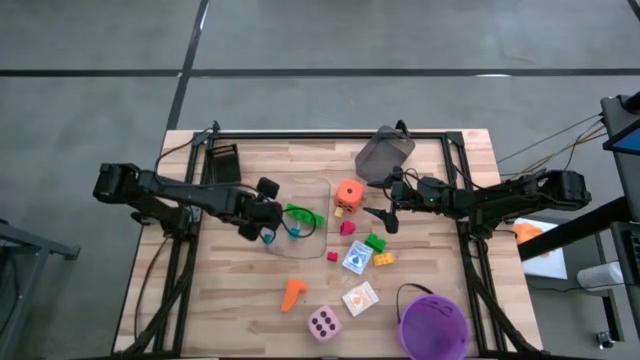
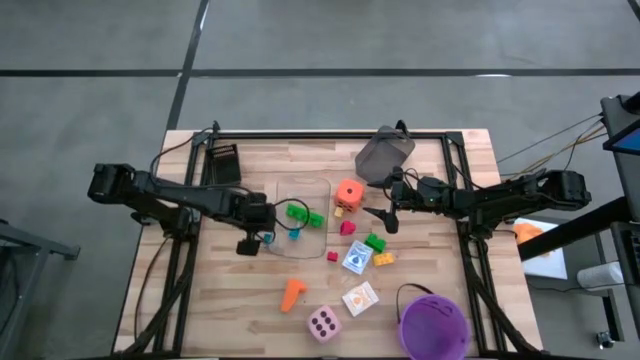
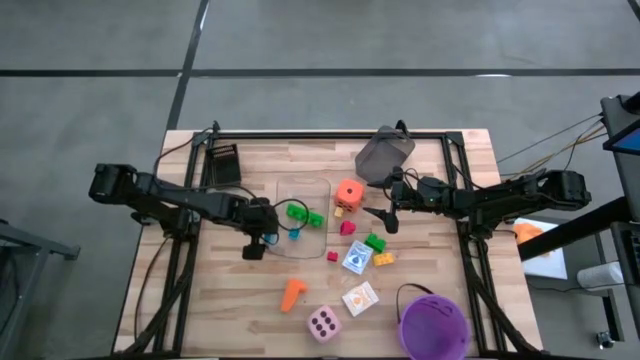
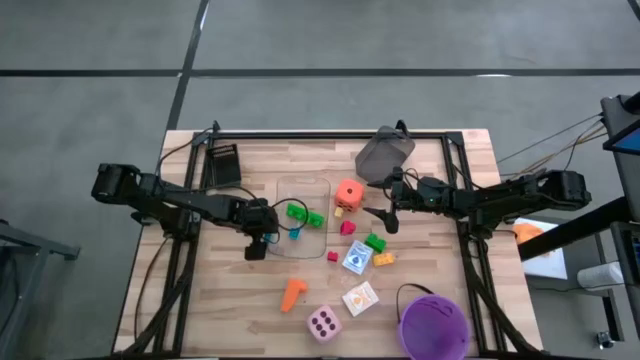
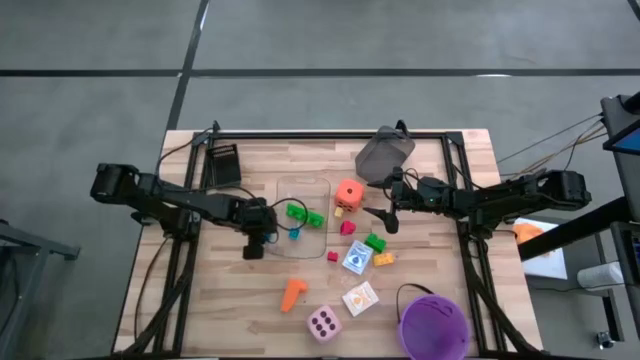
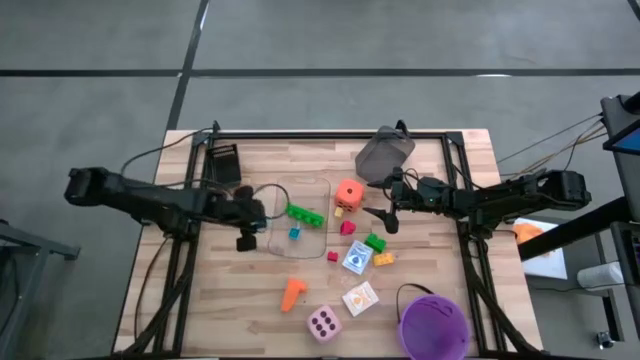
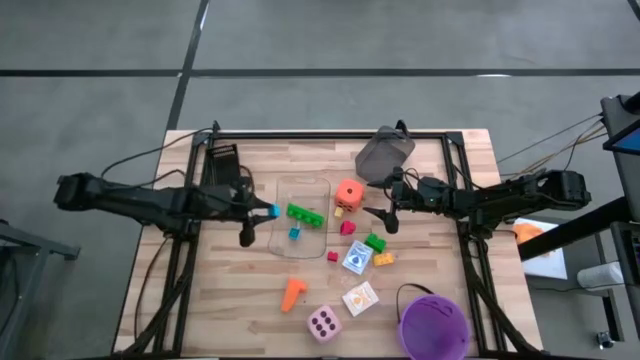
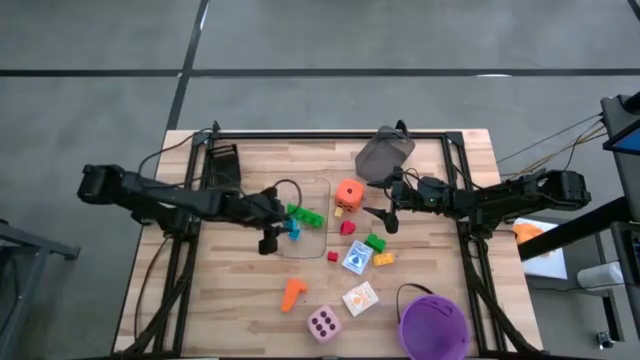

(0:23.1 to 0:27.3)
Task: Pick & Place Toys
Put the blue game piece into the transparent bin

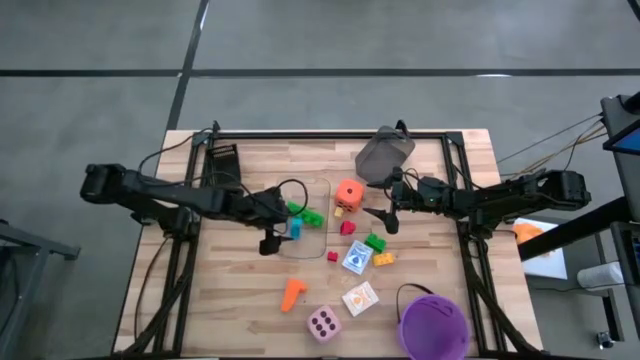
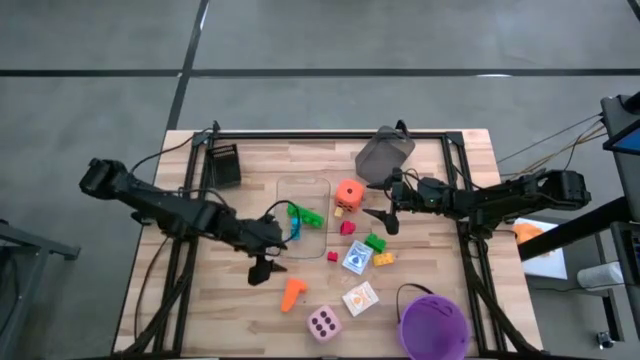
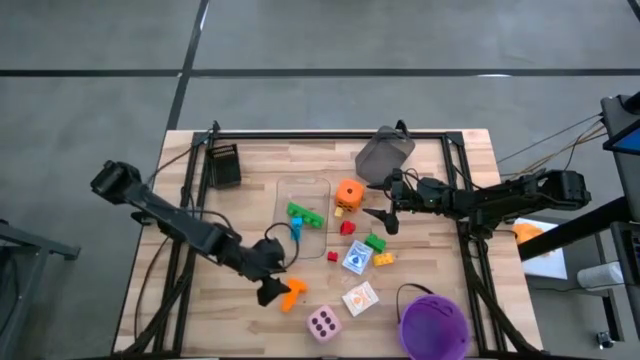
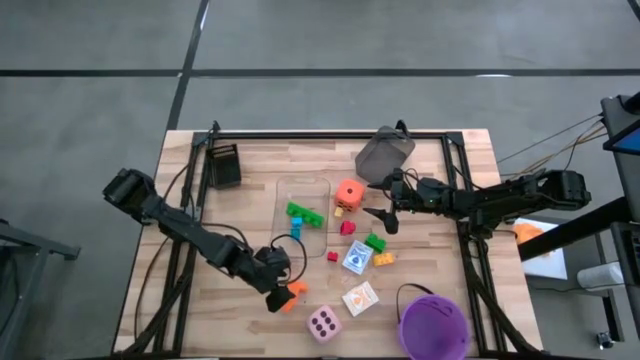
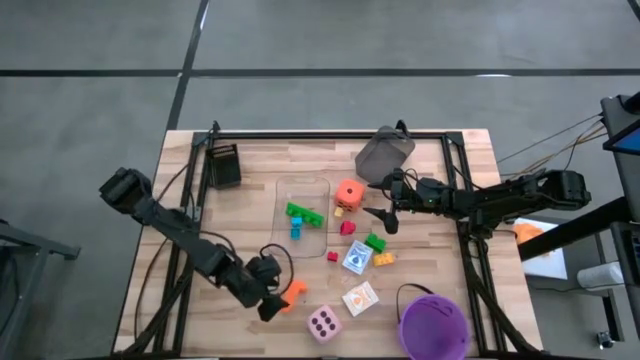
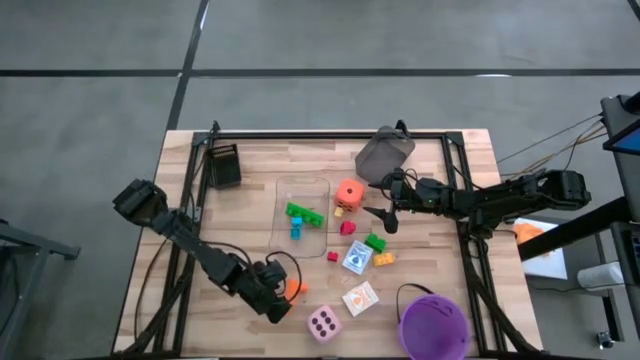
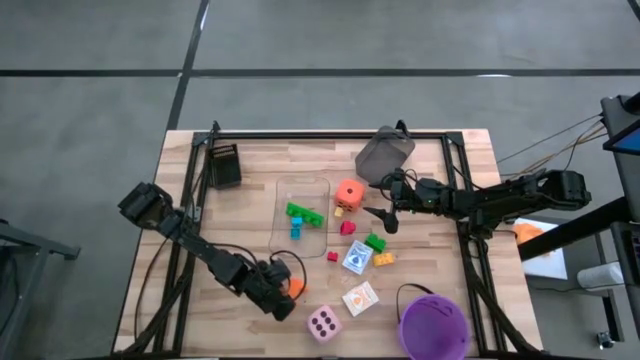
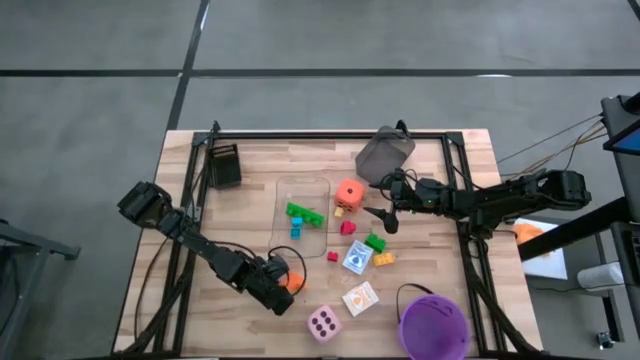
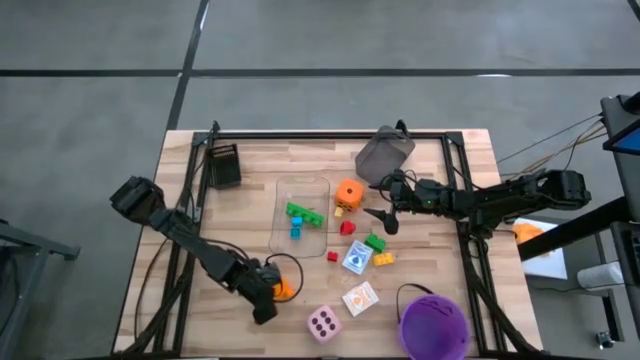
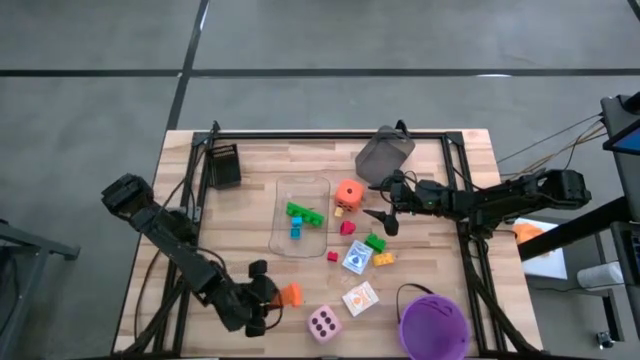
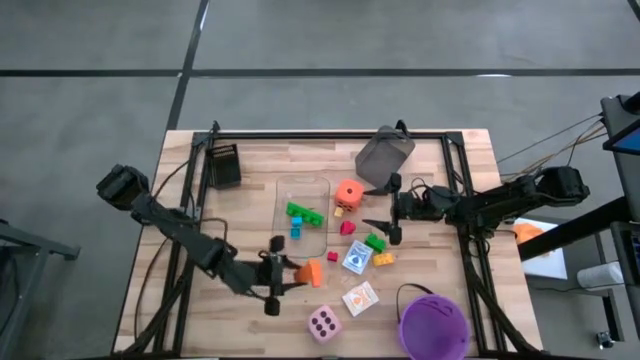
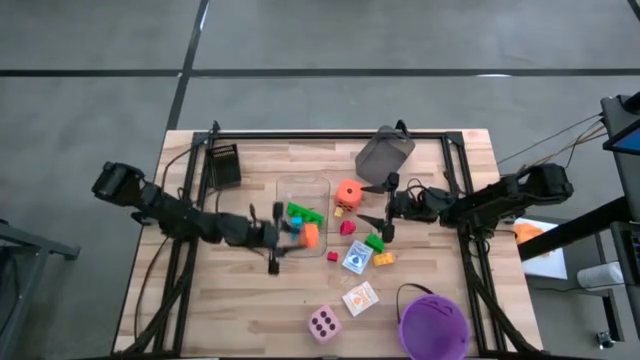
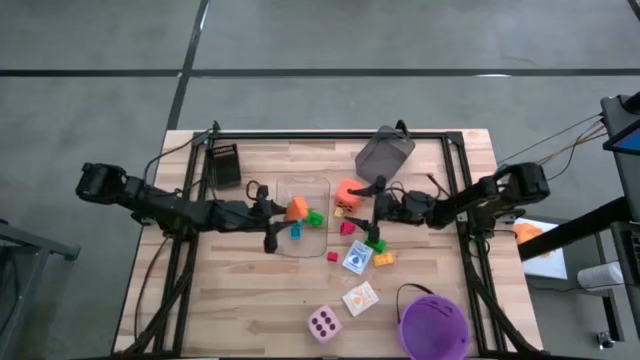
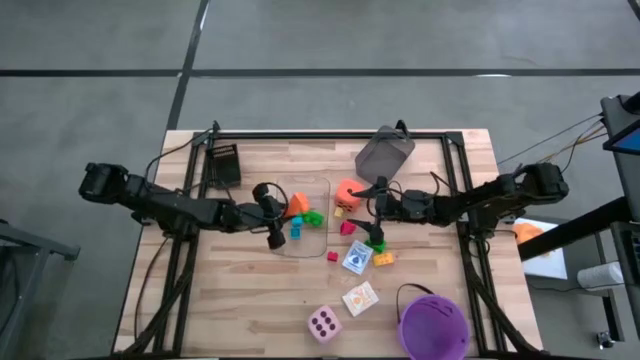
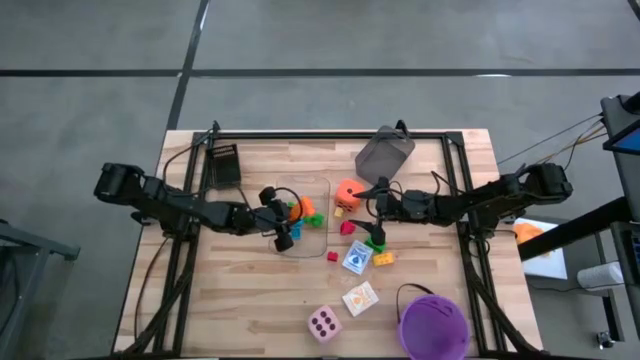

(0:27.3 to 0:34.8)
Put the orange game piece into the transparent bin

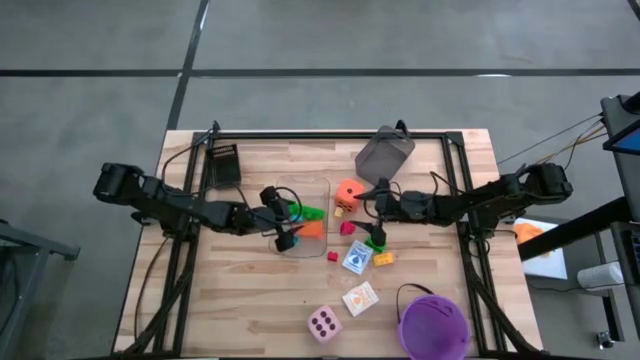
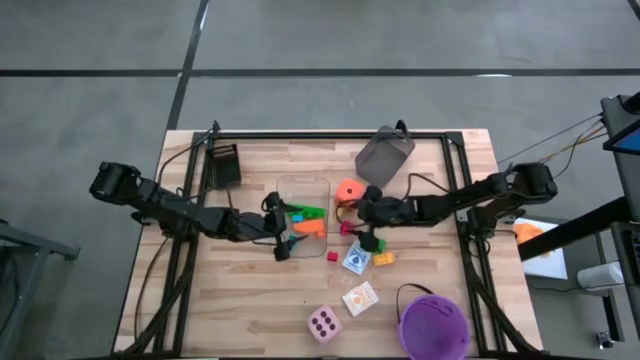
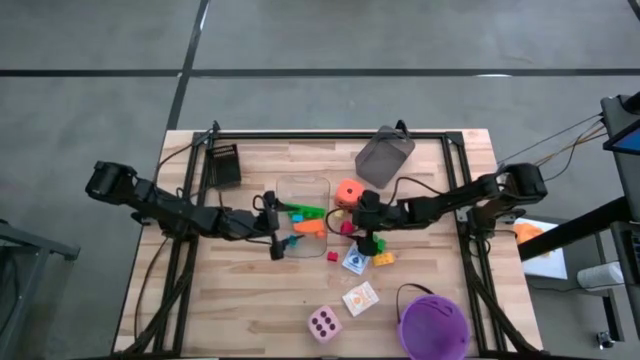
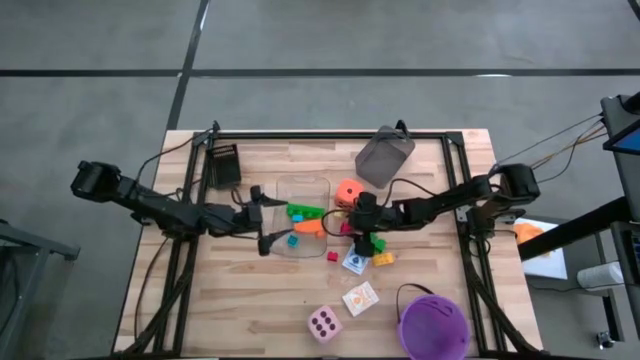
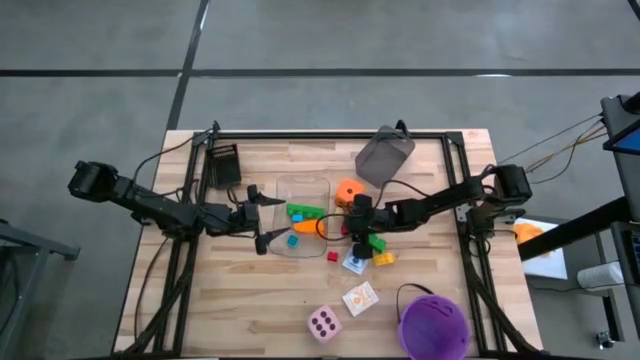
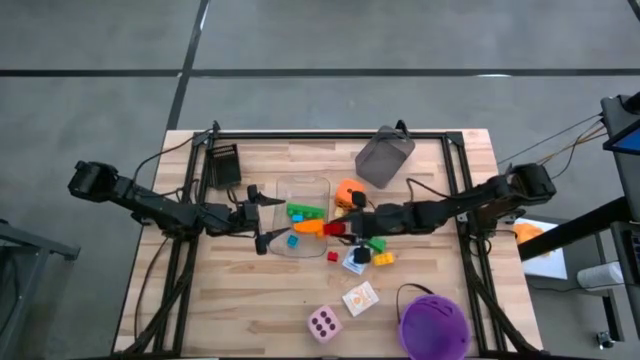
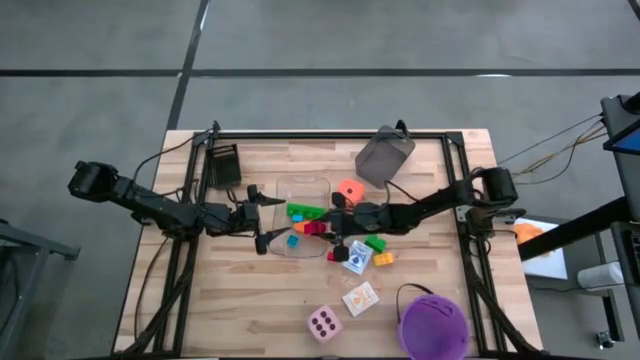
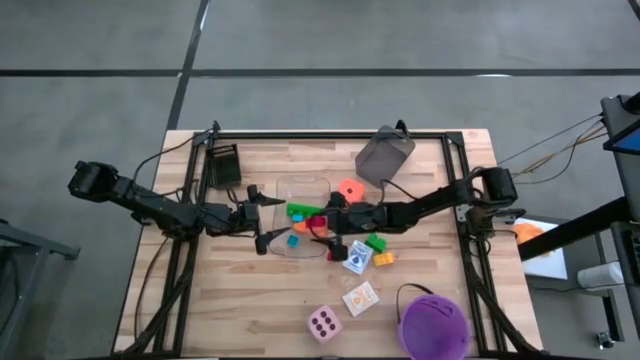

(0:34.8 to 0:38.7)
Put the top red game piece into the transparent bin

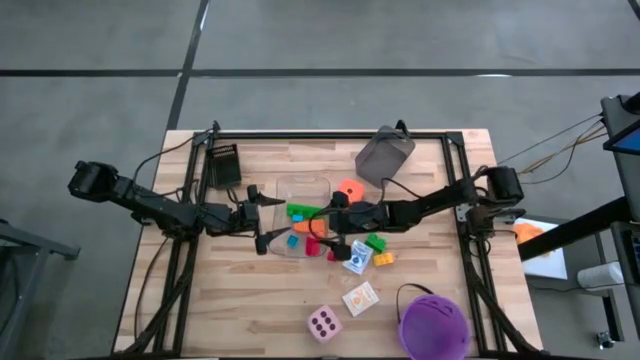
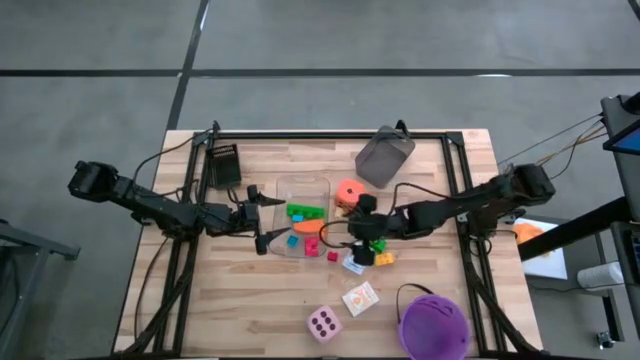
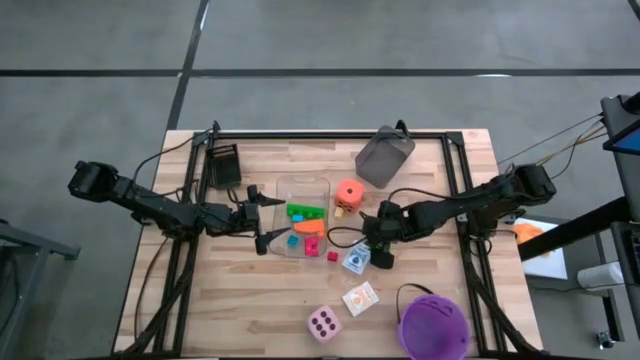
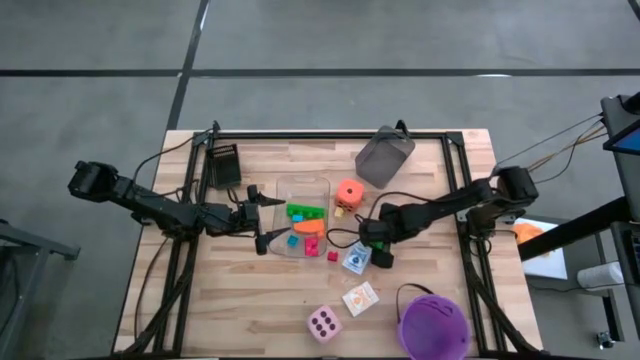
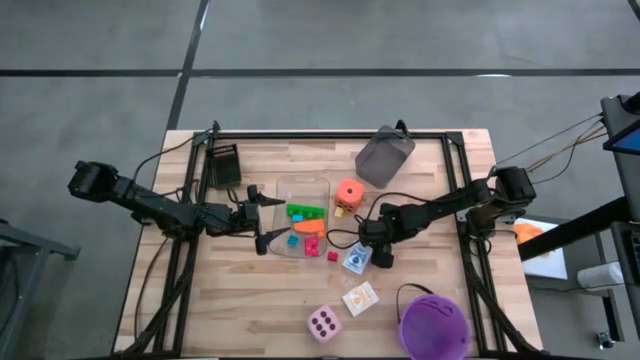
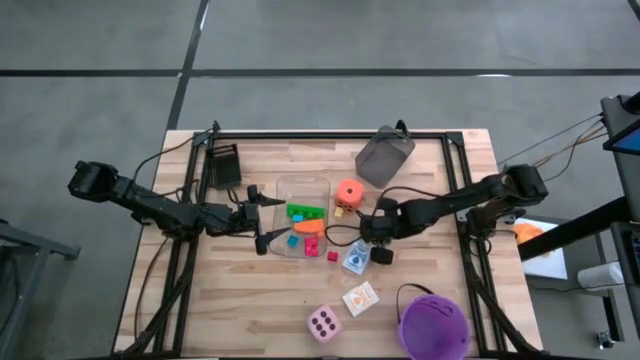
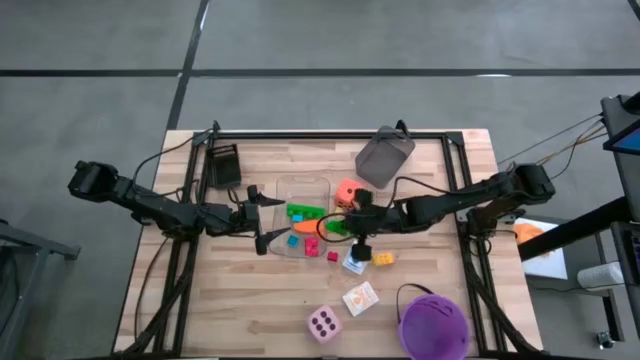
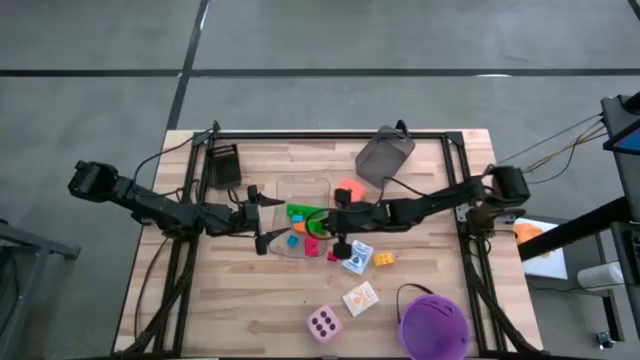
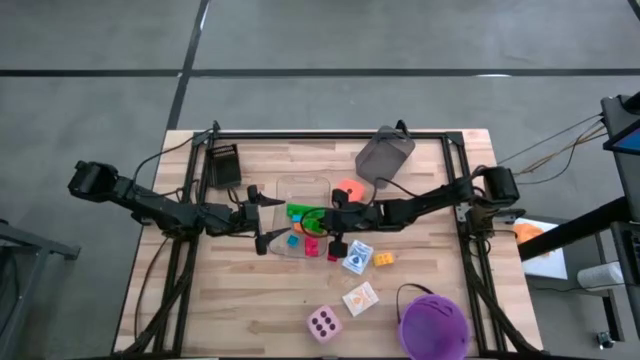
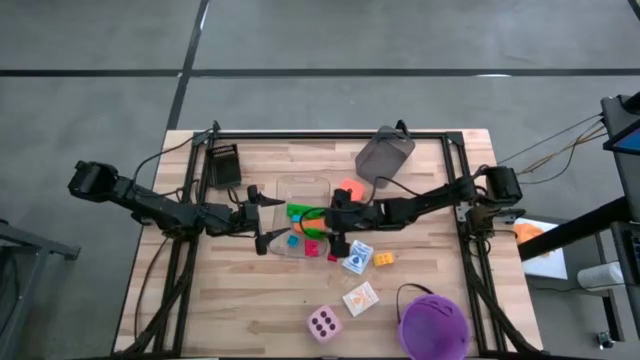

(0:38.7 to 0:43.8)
Put the green game piece into the transparent bin
